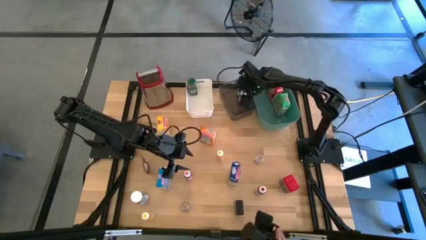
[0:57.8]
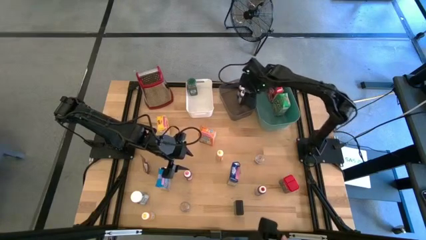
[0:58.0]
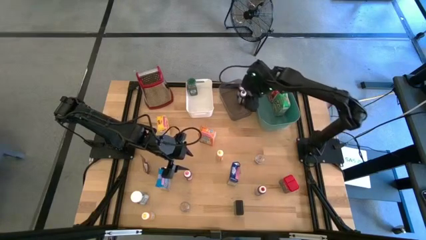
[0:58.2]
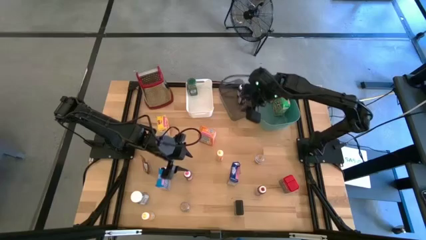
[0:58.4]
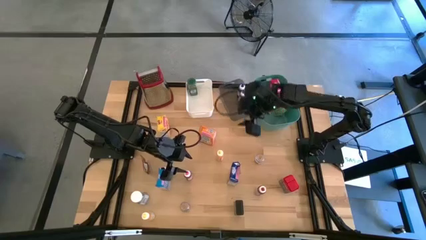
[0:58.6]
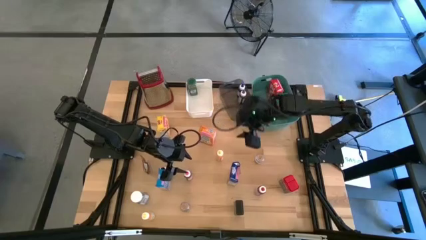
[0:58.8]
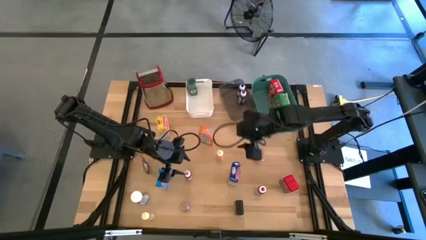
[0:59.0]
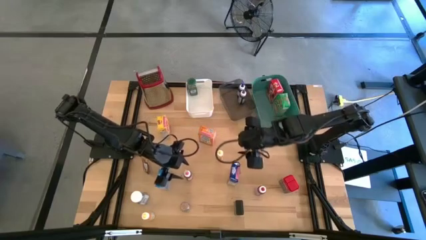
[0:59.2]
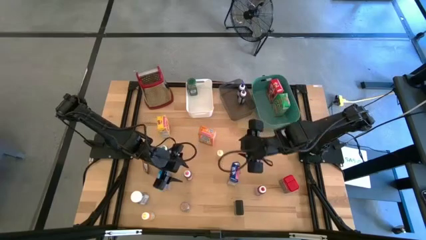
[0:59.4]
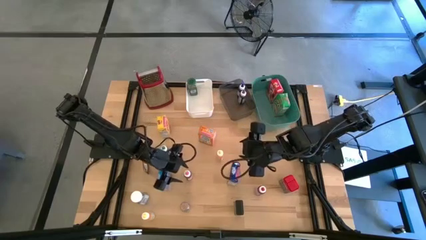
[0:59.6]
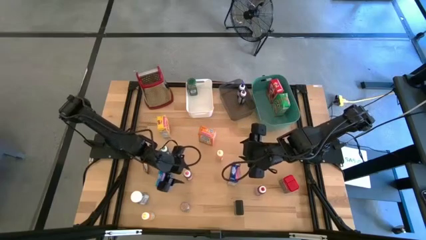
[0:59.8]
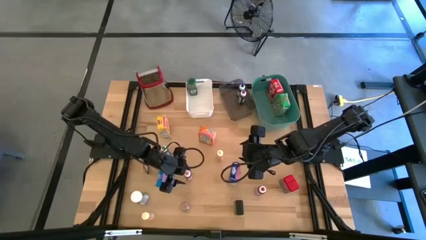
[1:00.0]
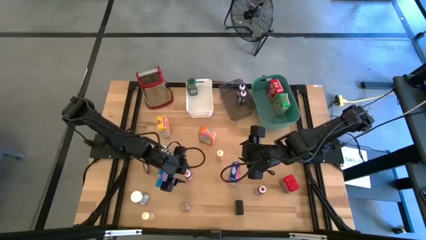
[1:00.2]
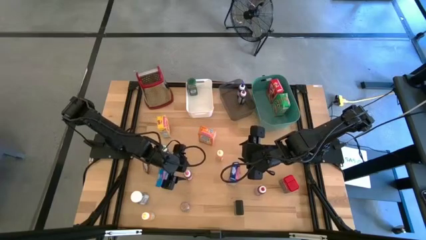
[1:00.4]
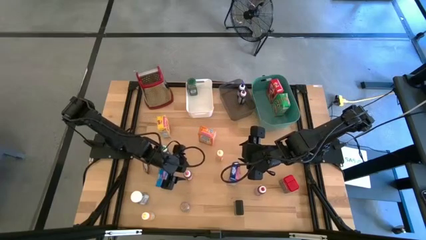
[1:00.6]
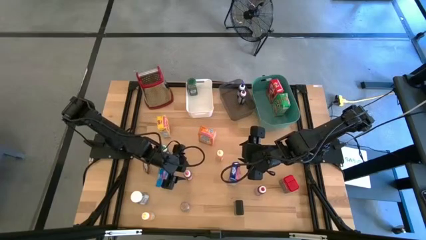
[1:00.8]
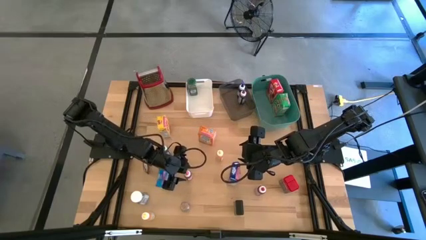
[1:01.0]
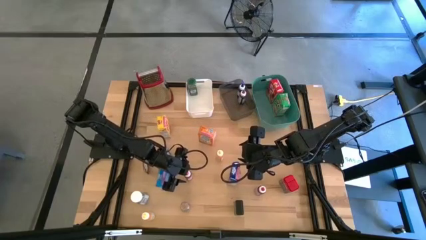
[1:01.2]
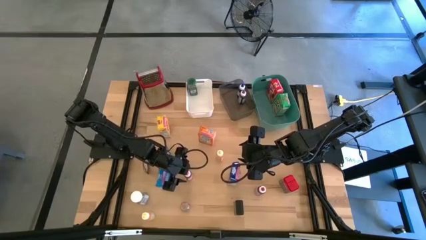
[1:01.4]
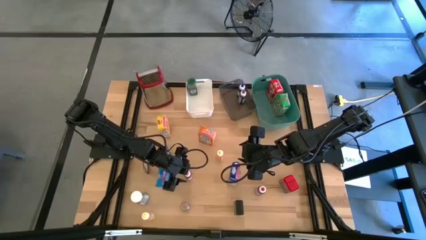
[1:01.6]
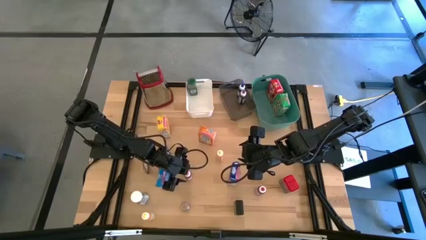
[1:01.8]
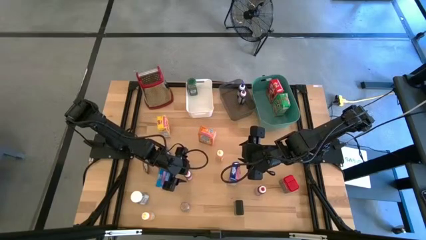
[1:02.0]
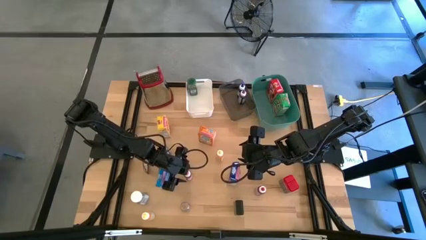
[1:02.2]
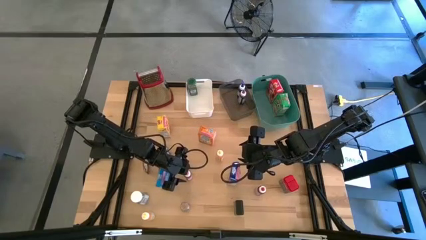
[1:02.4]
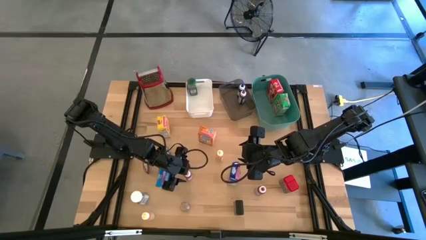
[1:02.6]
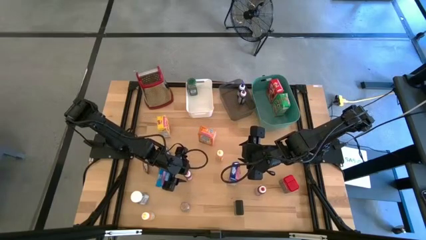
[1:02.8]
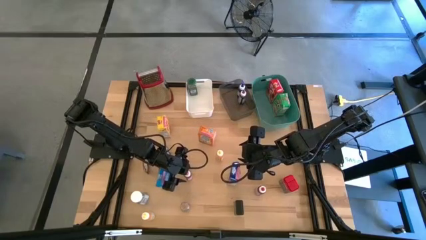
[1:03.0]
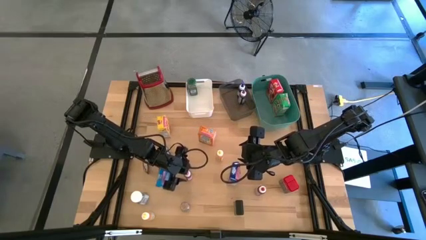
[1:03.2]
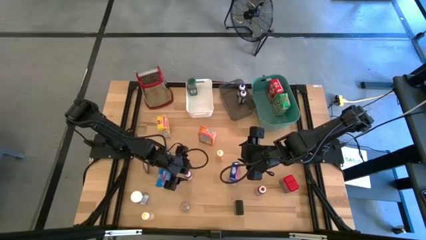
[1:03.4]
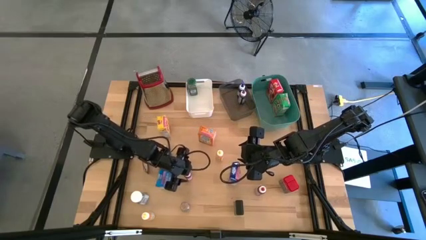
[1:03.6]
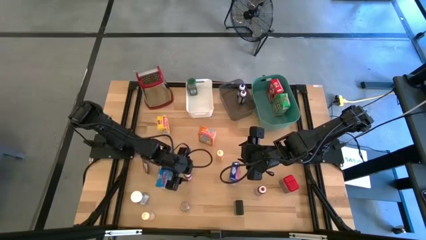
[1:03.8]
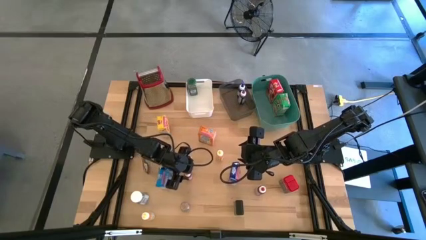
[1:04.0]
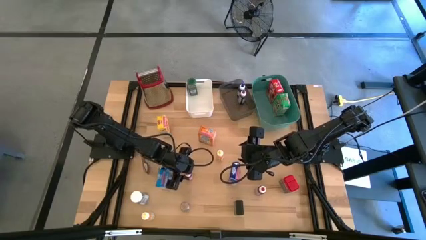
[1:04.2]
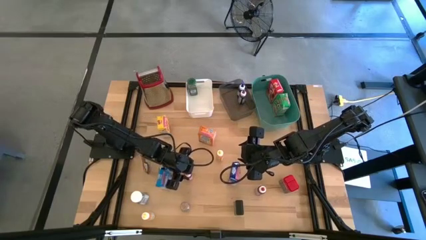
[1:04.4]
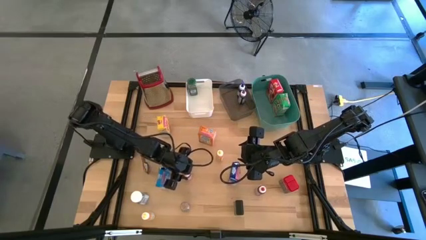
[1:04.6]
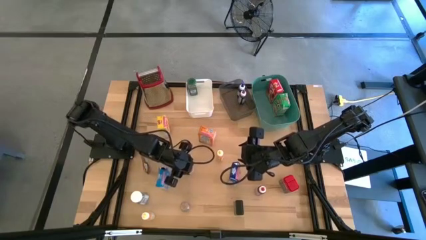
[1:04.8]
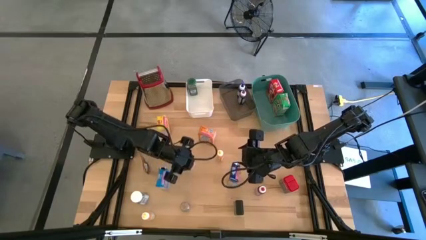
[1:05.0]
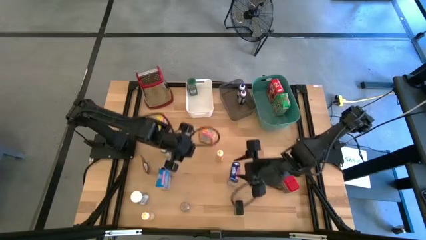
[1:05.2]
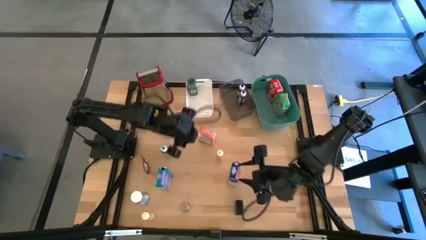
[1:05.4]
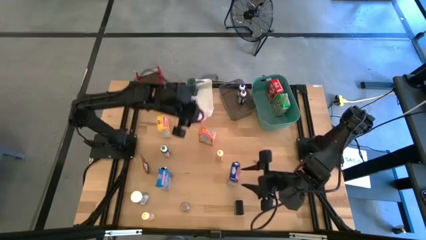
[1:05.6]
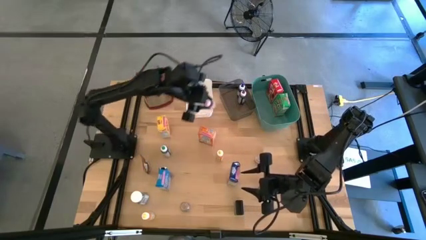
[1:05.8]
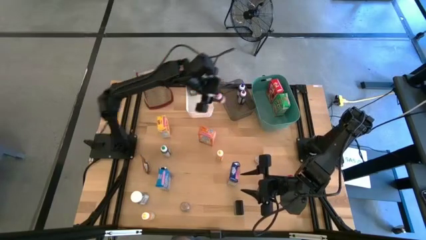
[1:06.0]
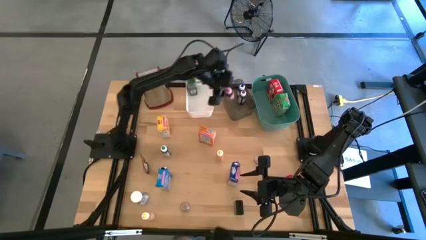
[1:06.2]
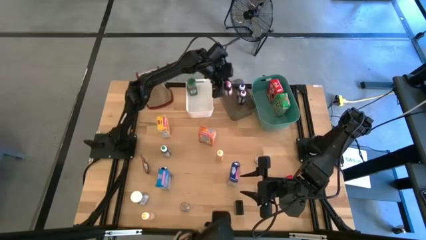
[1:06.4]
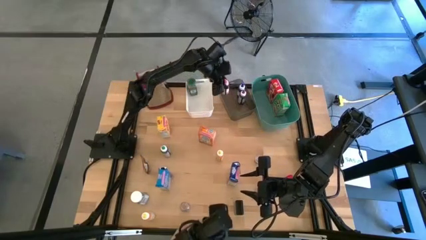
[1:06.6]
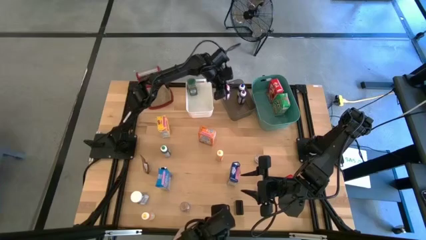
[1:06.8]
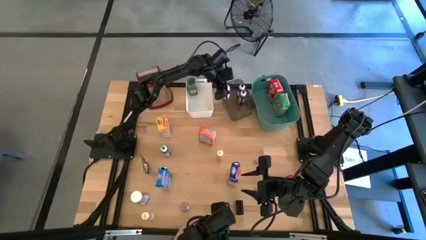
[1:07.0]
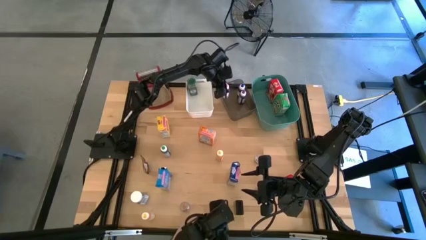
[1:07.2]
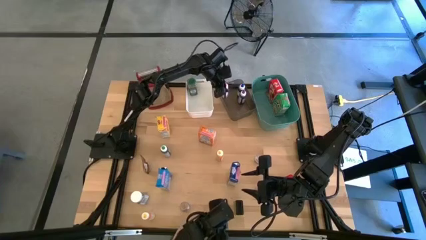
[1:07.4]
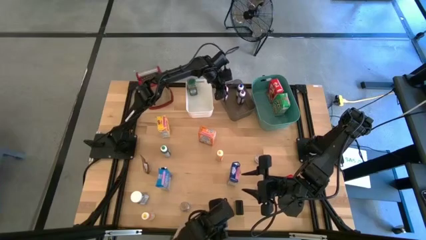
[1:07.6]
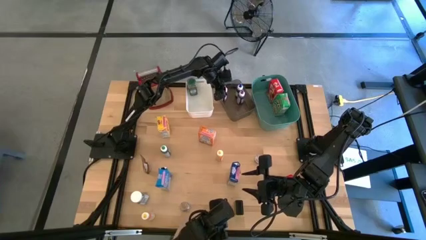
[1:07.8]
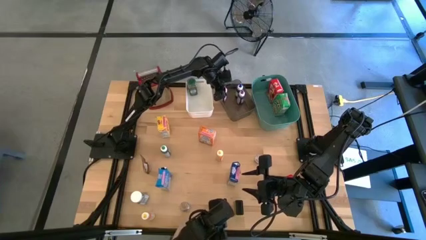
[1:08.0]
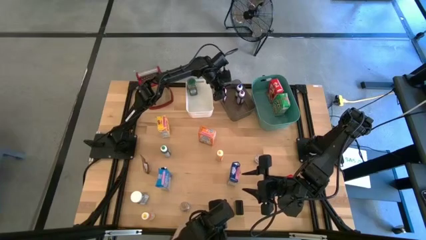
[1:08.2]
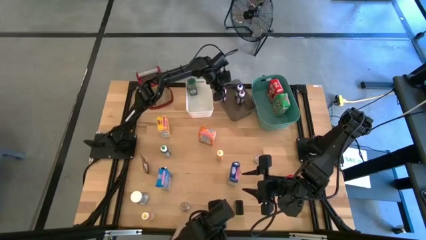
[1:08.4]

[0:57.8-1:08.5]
Task: Pick & Place Kitchen Items
Put the pink food coloring bottle into the black bin

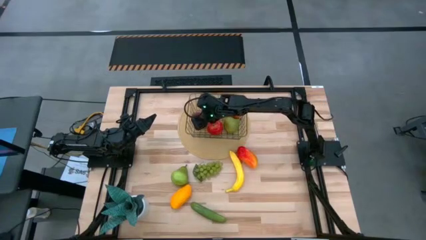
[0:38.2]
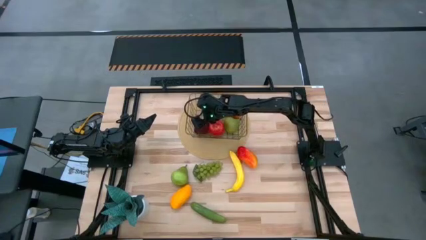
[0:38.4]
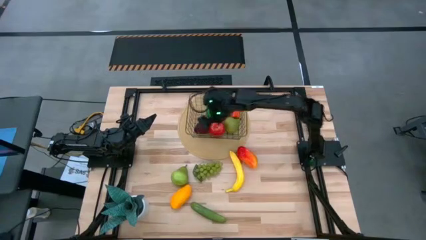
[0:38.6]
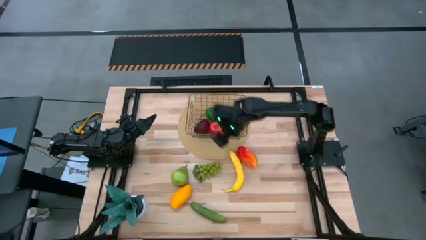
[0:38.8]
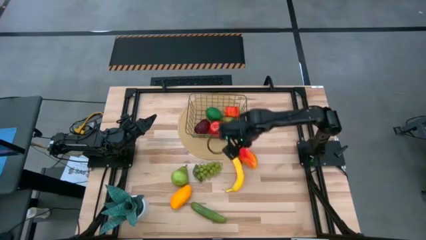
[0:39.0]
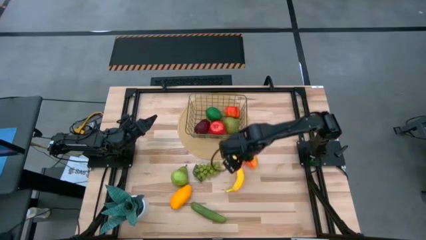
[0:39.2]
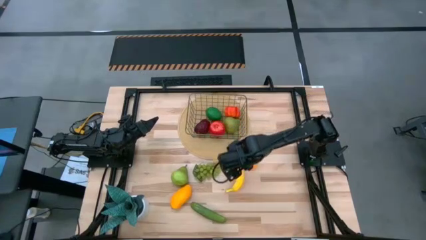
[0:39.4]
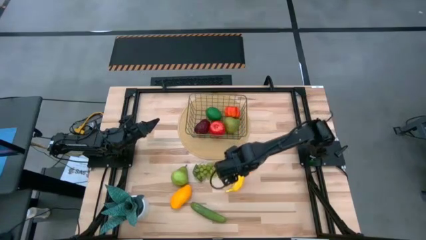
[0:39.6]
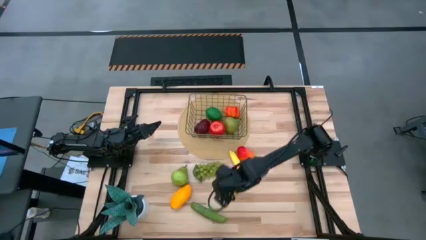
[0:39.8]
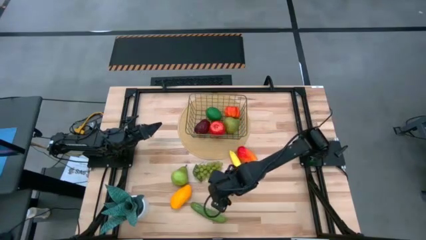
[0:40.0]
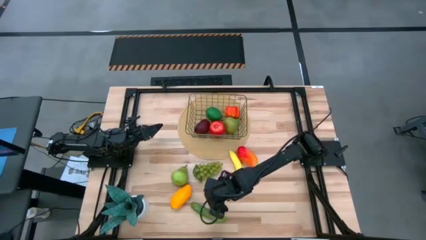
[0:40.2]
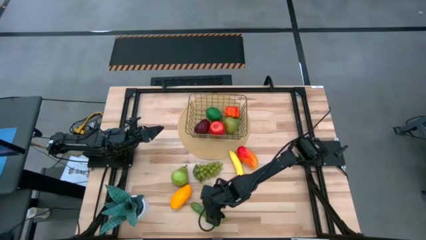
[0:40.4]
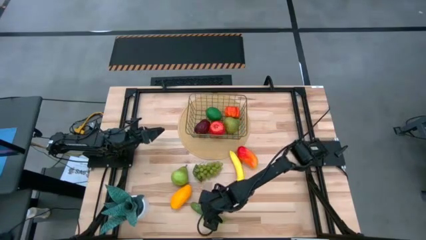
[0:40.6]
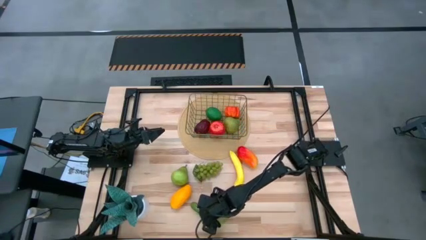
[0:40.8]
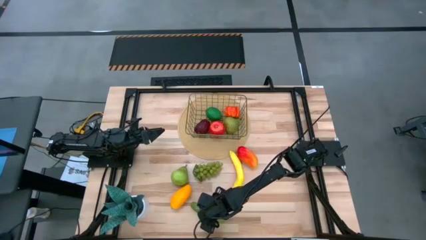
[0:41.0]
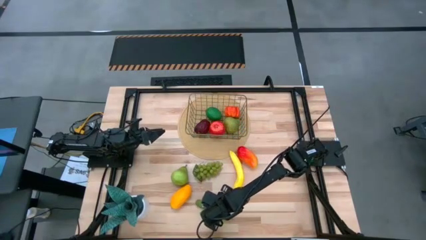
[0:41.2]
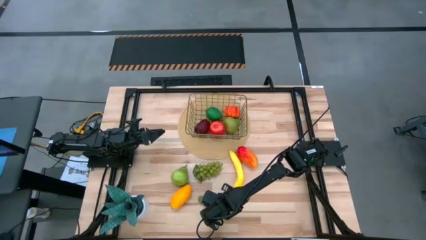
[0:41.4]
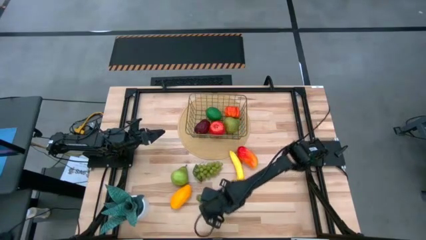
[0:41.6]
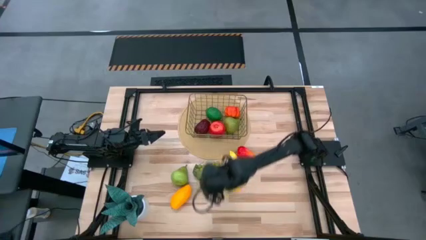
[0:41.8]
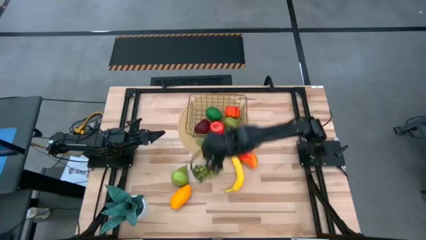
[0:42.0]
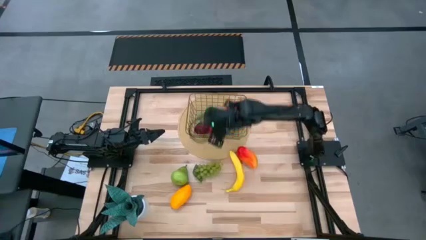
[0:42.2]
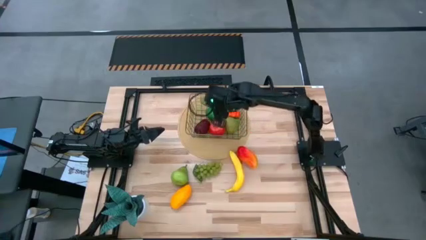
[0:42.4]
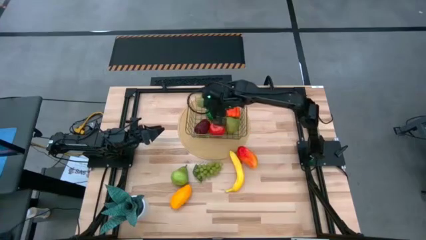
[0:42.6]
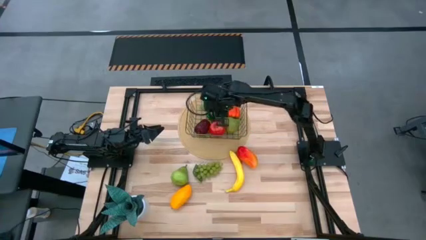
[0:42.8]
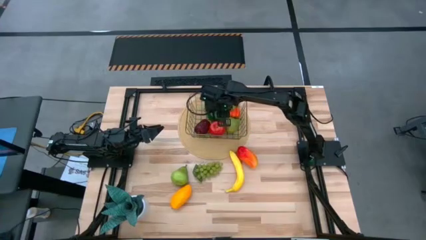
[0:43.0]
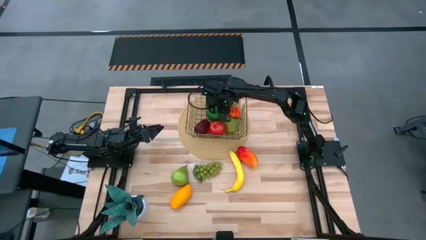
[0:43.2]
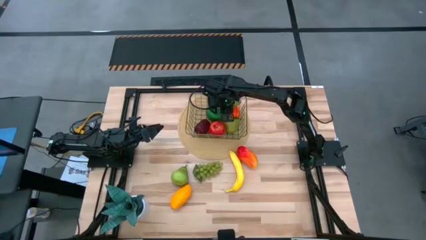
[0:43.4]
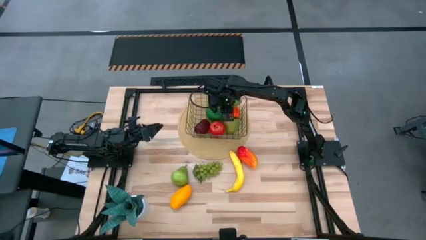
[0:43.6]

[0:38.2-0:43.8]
Task: Build produce basket
Put the cucumber into the wire basket
